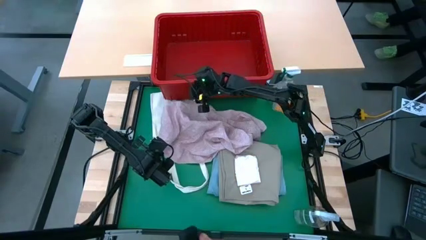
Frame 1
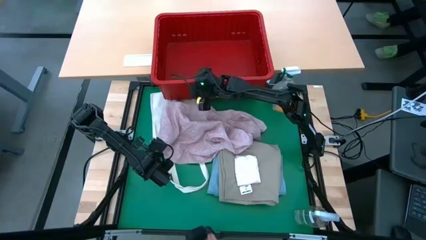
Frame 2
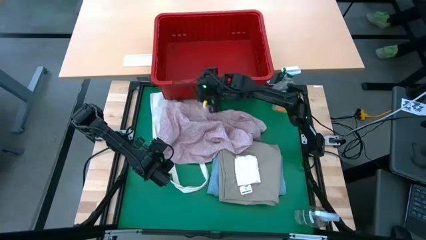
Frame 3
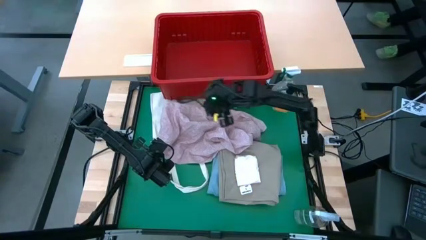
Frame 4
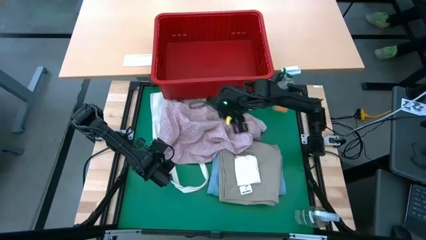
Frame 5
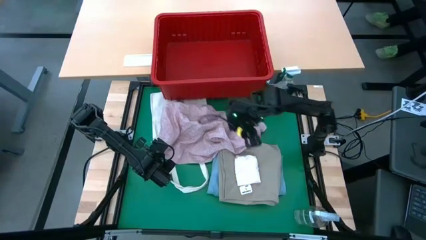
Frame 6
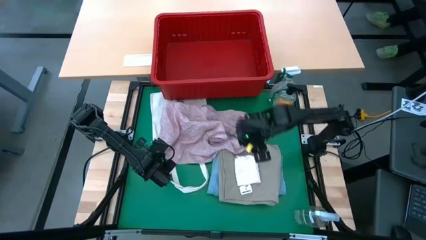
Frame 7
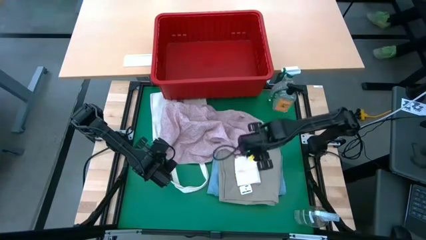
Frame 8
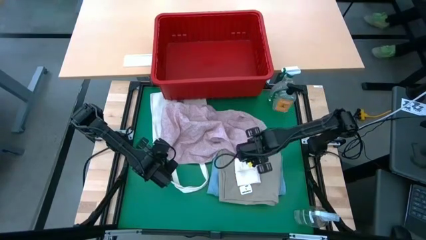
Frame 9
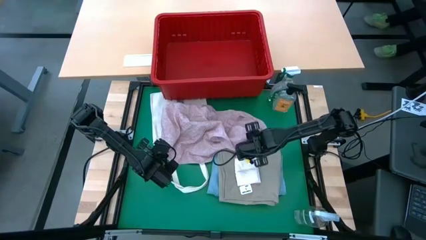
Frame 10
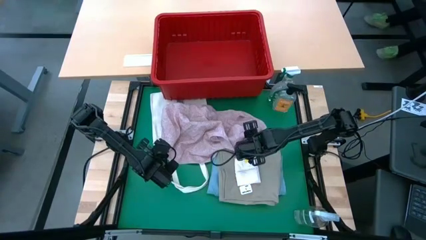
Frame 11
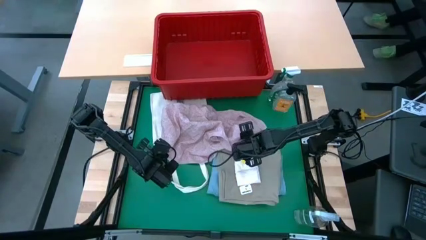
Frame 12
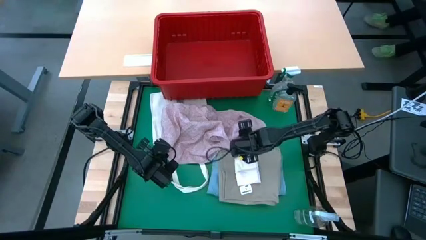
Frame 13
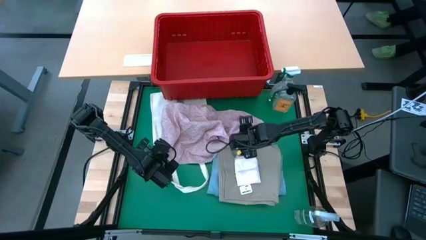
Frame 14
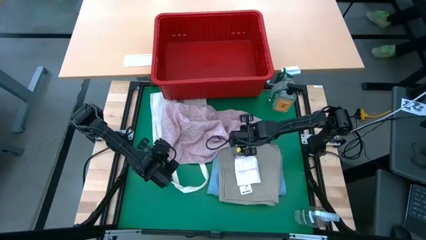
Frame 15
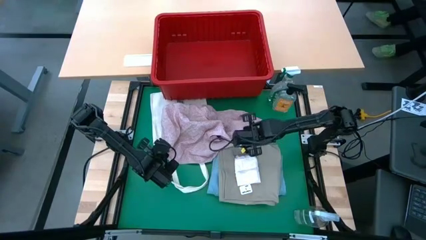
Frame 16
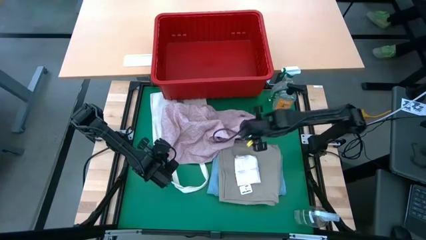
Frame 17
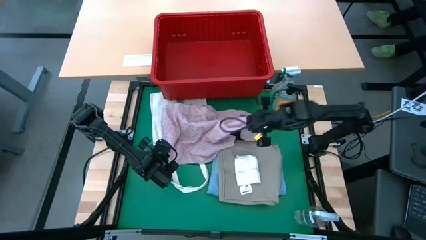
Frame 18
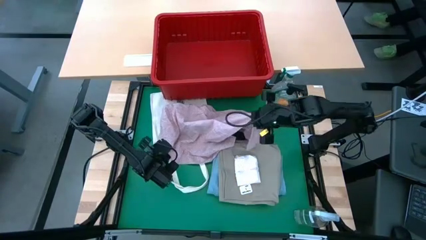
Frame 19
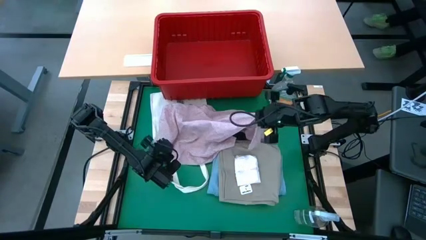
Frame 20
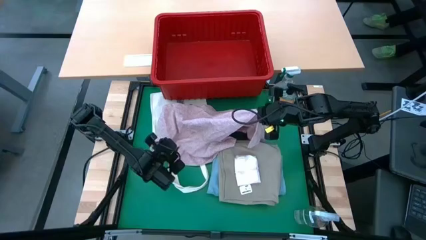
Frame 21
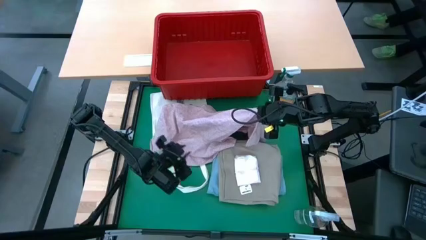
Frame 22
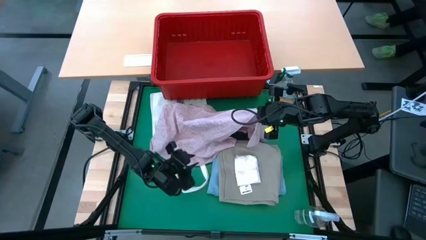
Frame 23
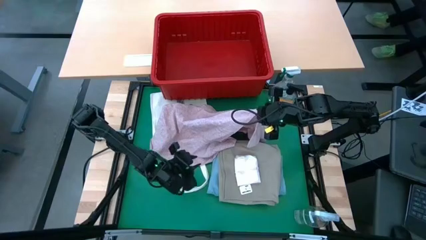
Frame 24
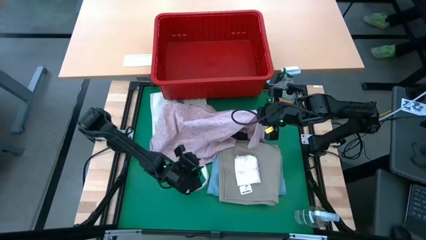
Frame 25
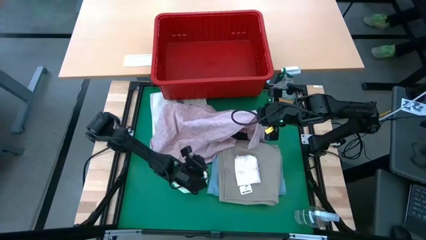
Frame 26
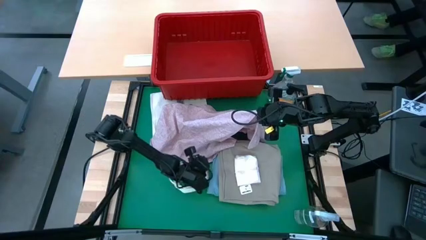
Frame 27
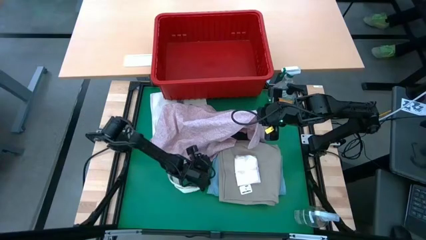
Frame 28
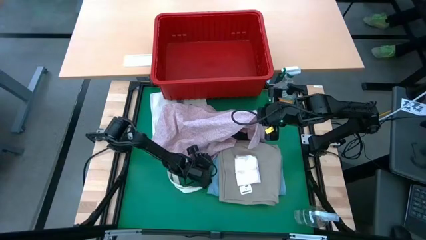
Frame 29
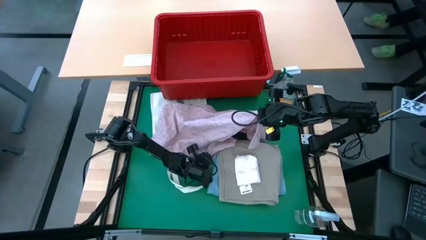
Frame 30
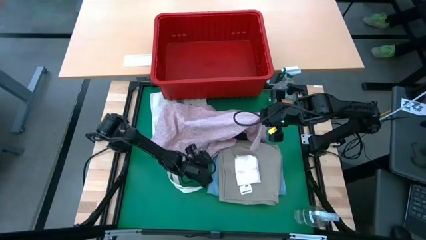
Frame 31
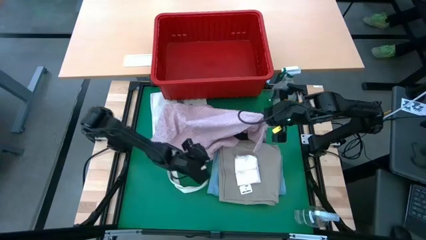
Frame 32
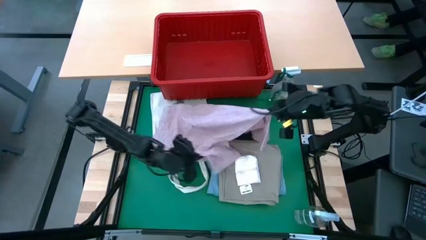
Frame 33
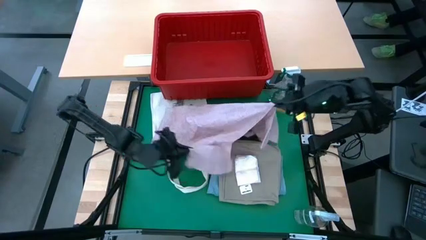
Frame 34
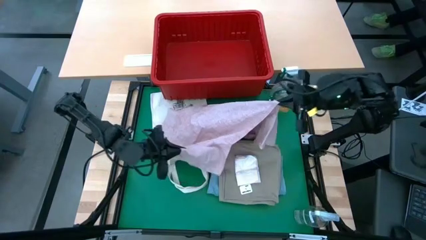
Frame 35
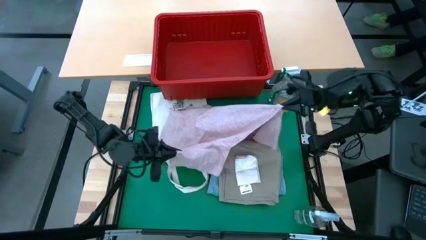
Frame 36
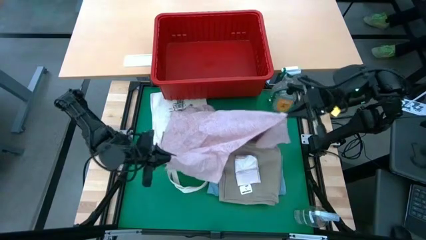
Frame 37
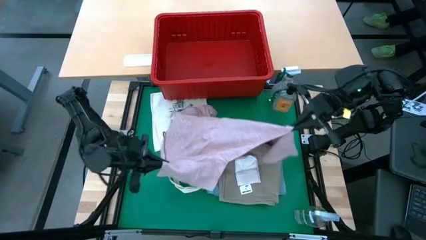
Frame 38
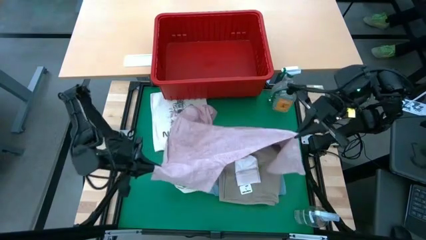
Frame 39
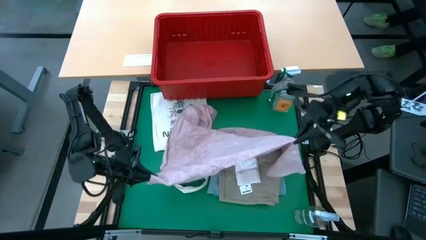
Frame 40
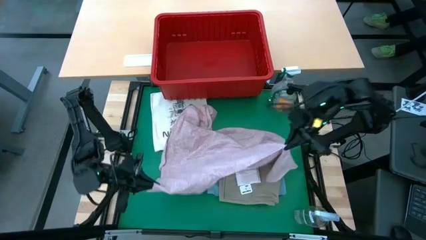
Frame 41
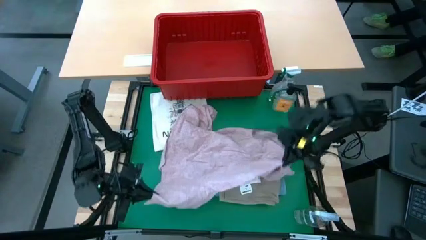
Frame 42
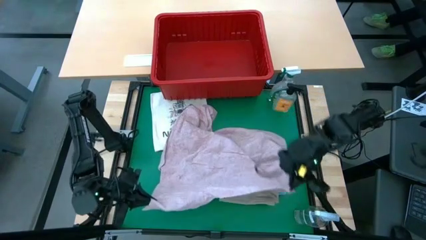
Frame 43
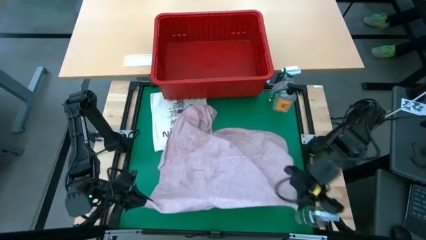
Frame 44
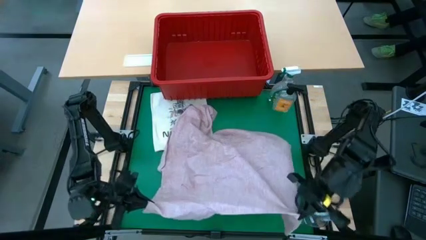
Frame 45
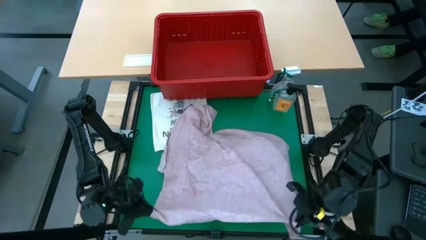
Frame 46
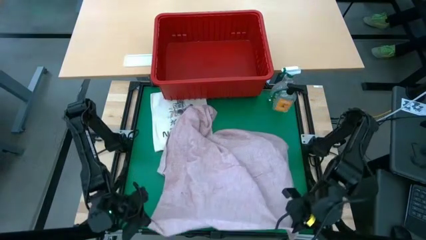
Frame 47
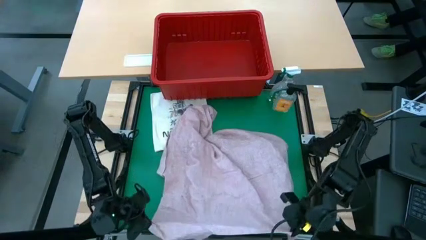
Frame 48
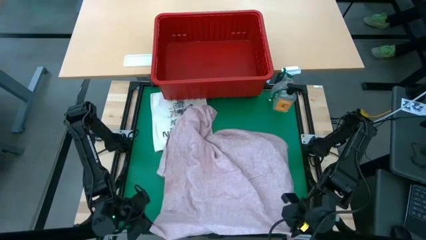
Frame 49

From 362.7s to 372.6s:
Task: Fold laundry
Fold the pink polo
